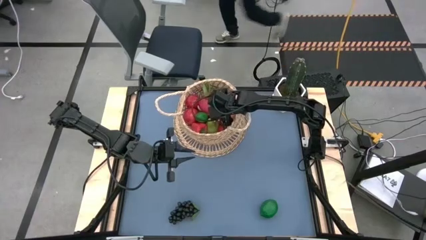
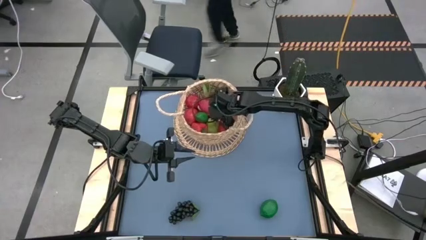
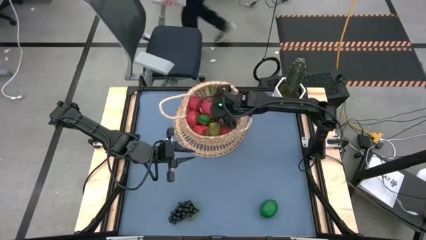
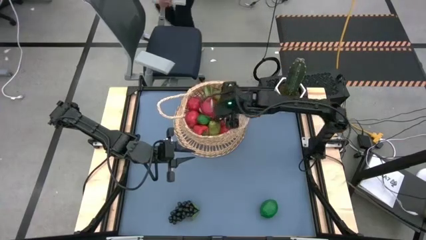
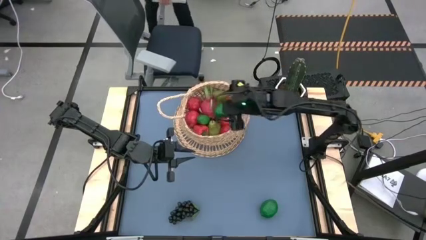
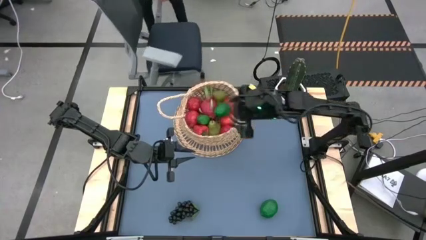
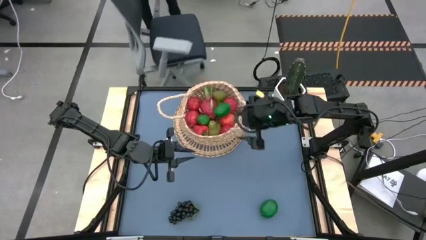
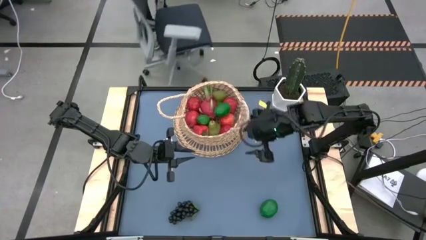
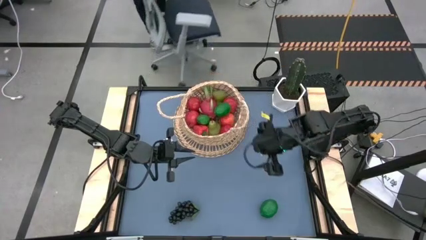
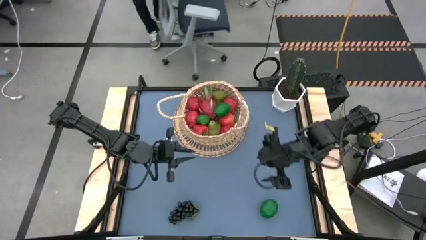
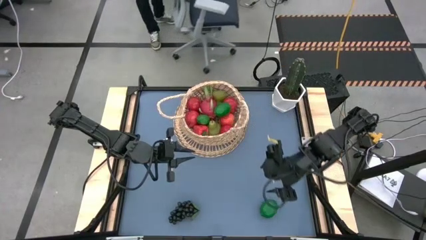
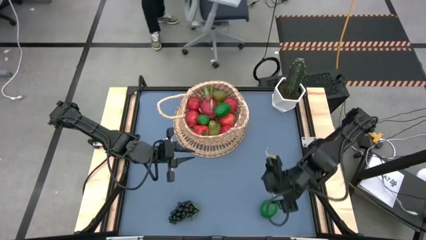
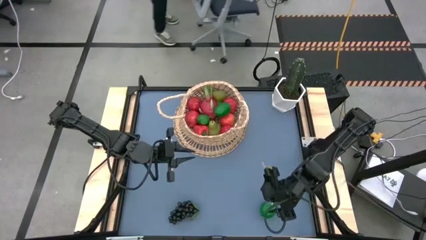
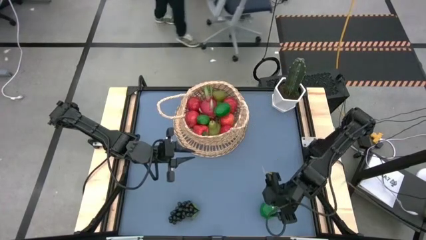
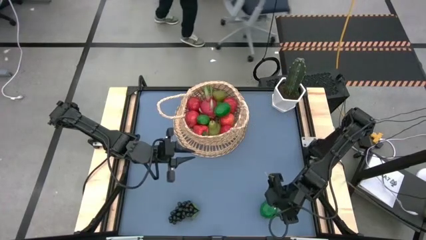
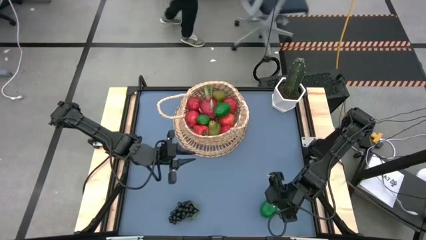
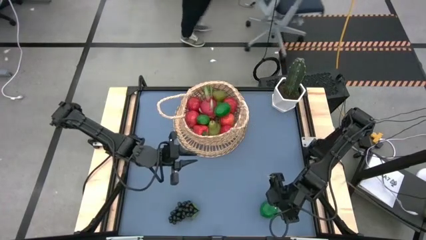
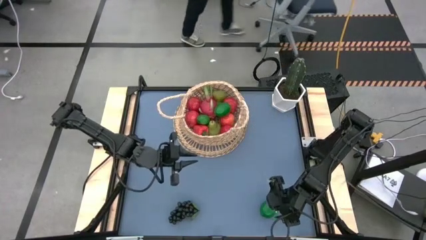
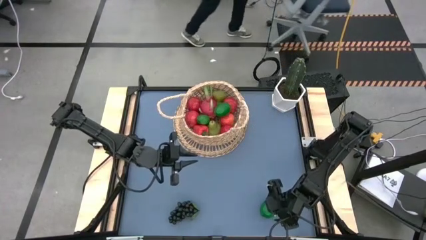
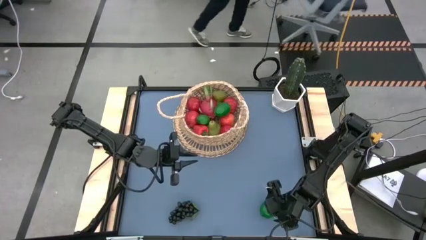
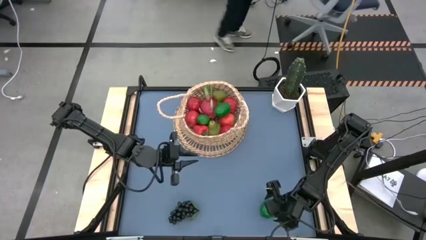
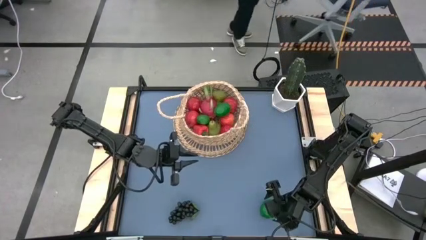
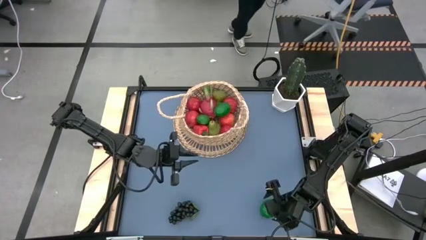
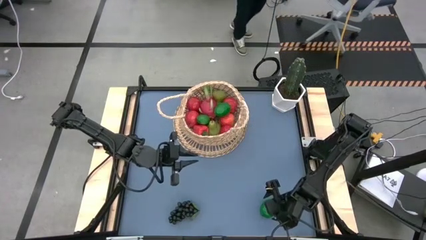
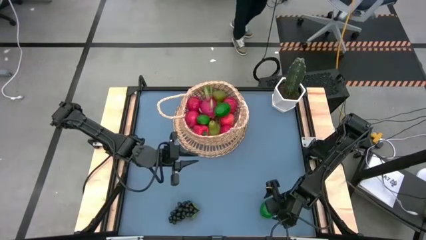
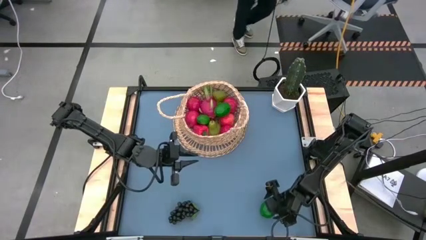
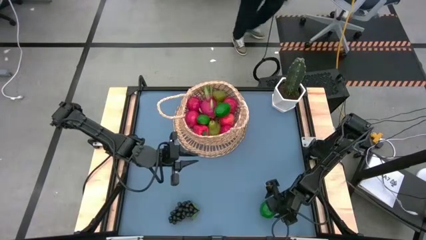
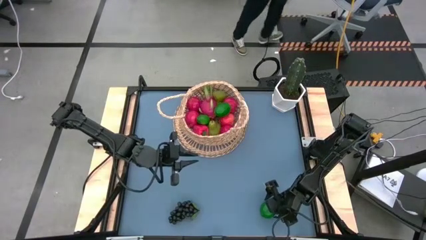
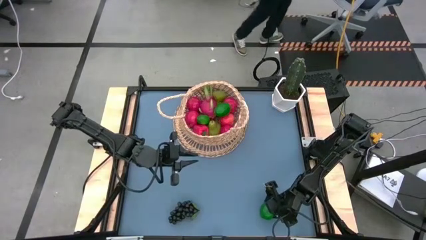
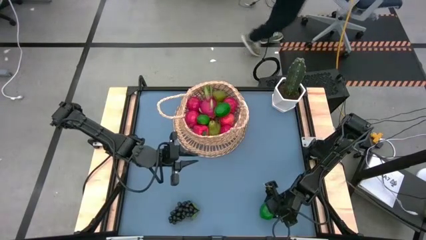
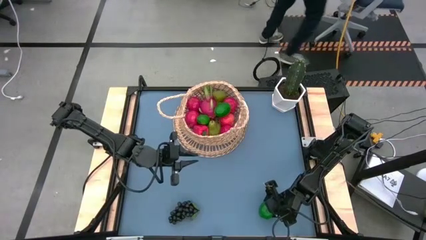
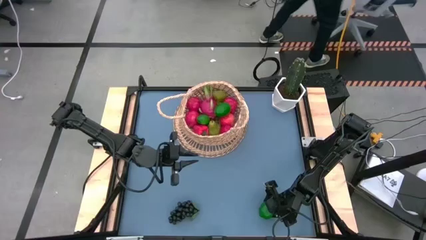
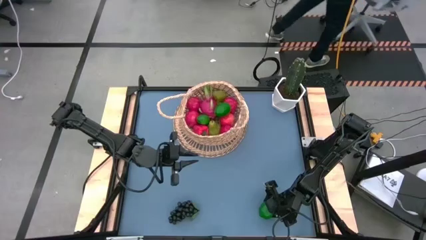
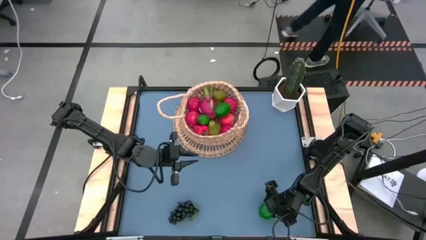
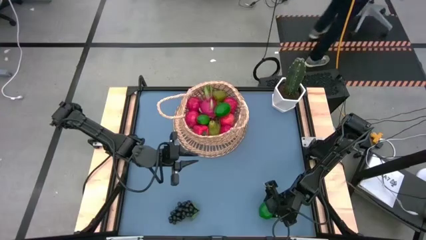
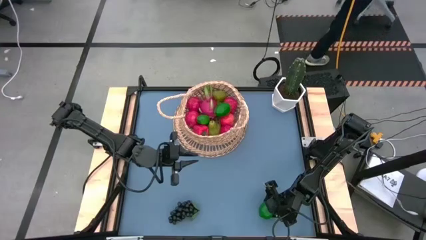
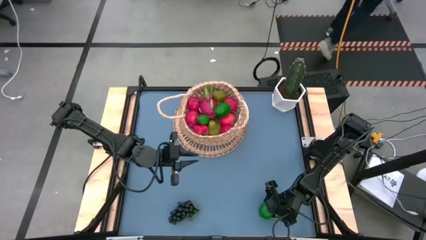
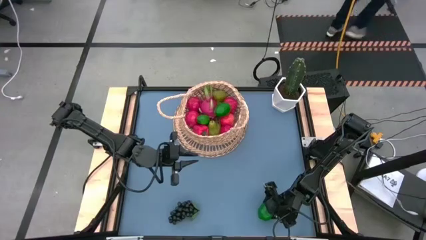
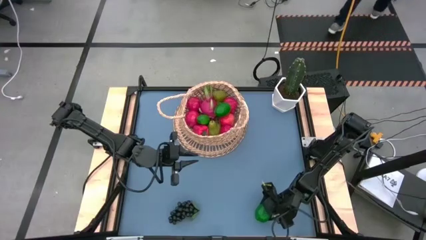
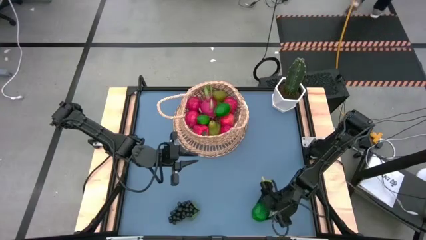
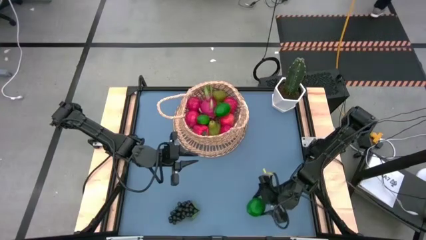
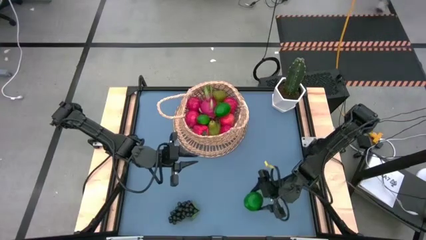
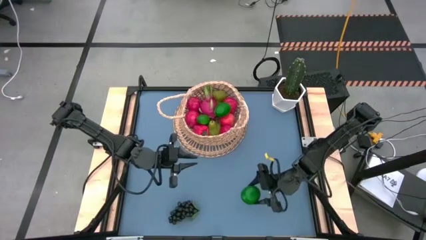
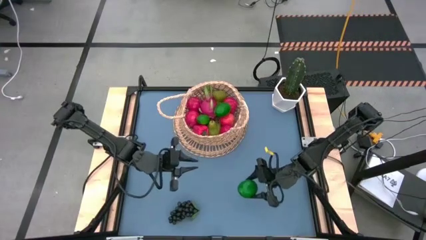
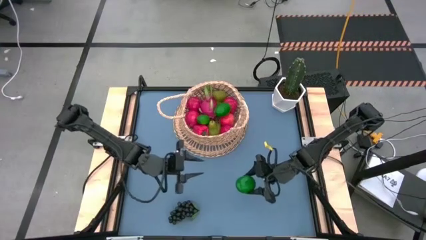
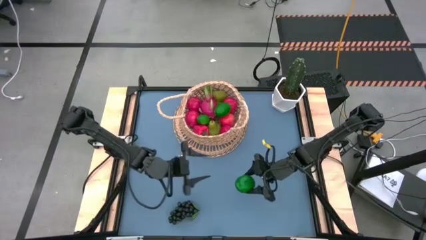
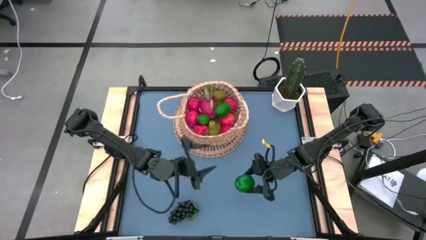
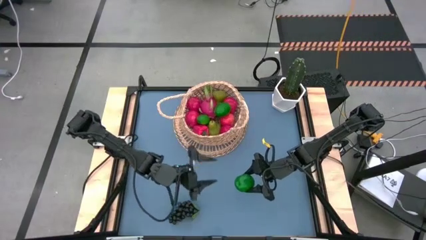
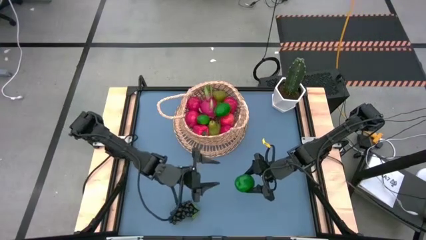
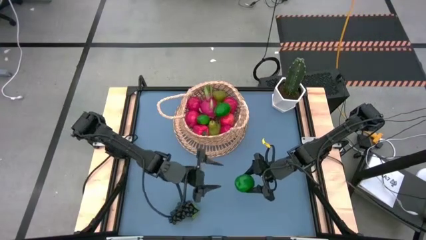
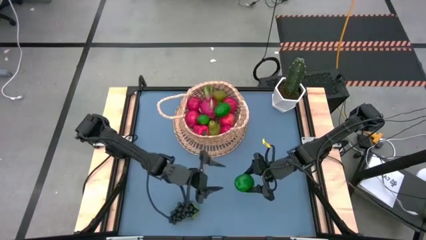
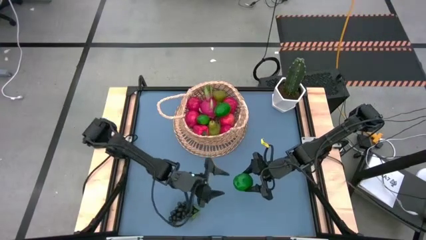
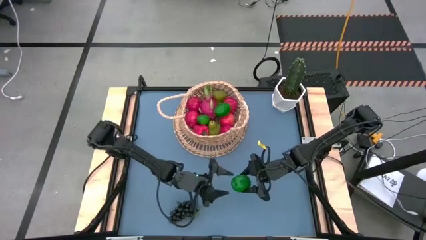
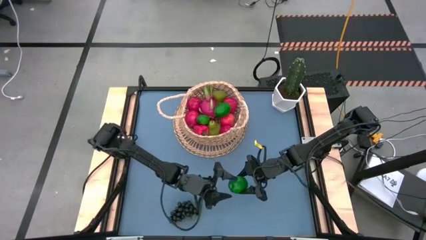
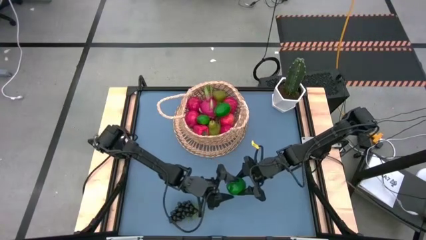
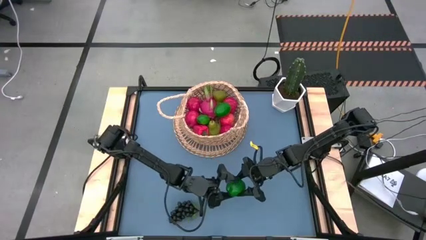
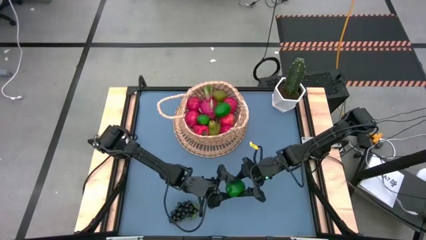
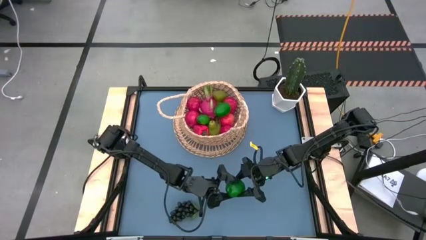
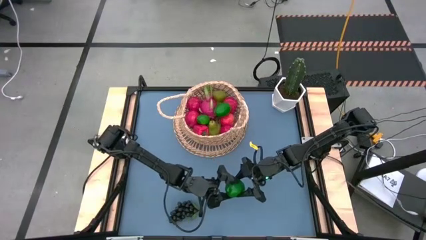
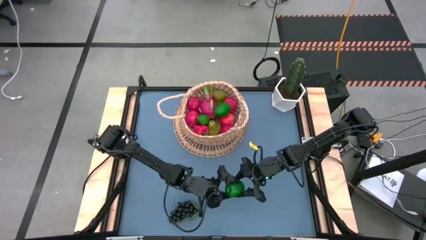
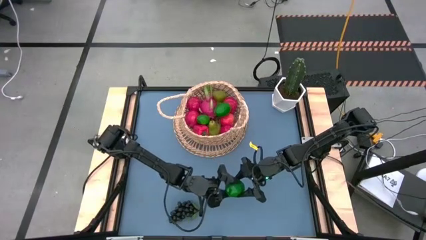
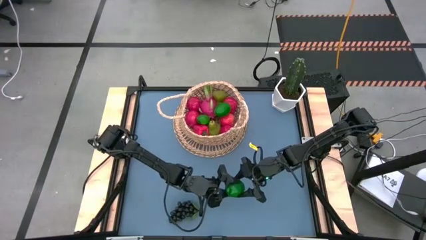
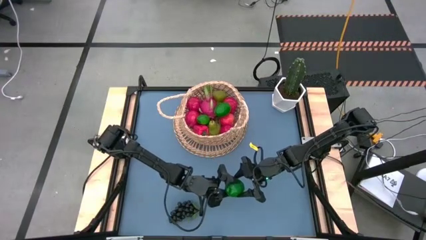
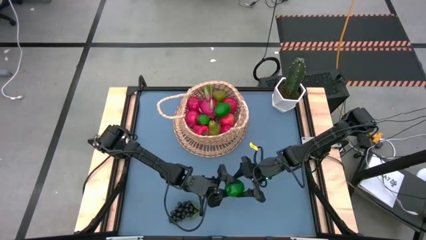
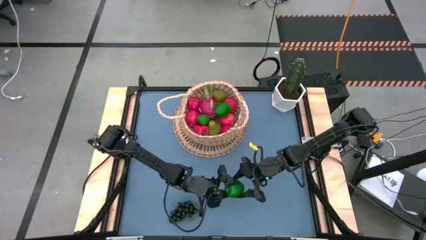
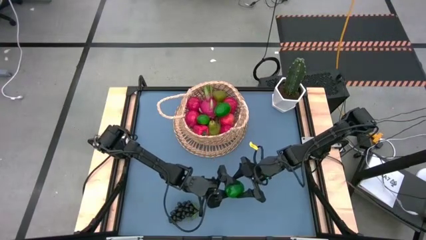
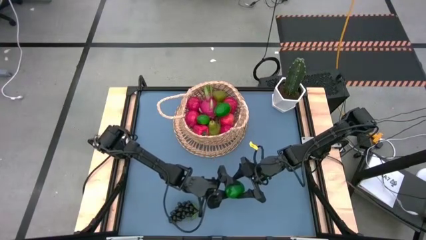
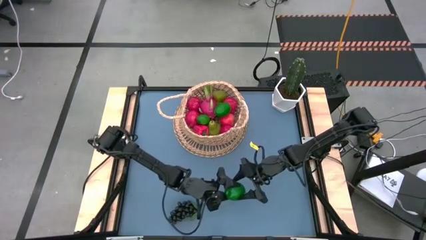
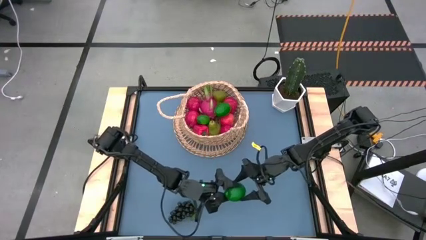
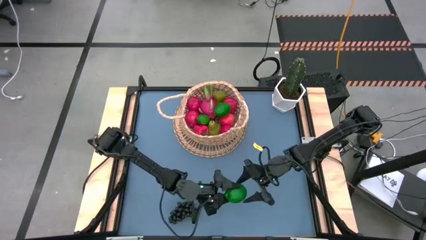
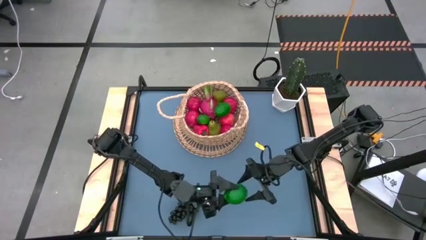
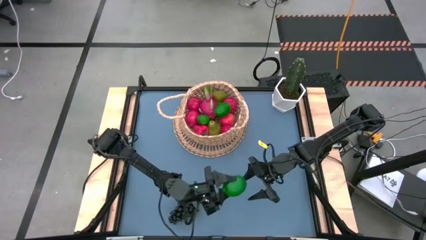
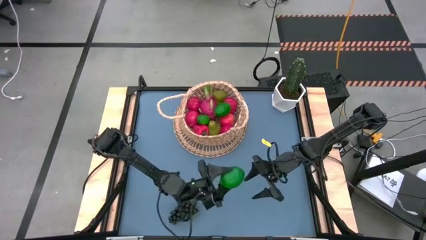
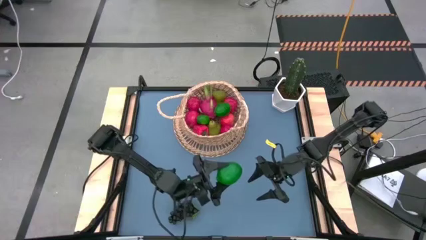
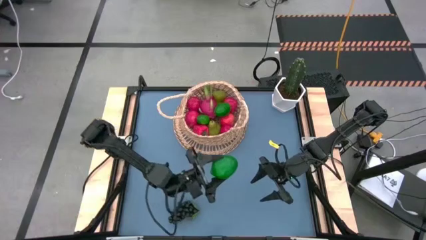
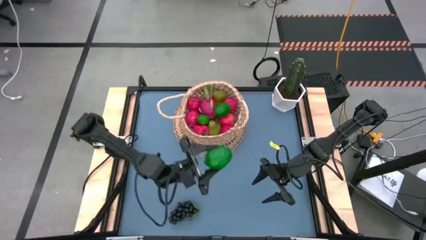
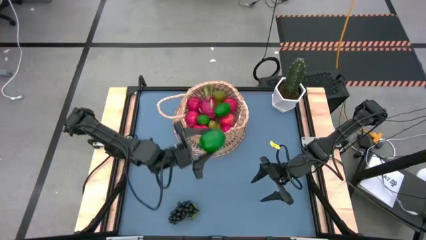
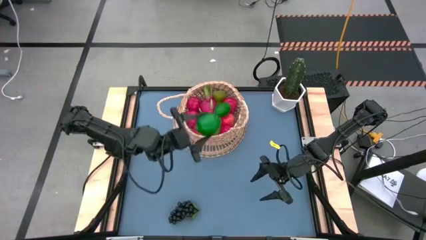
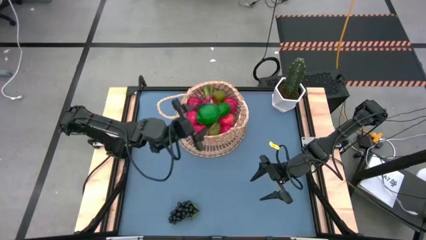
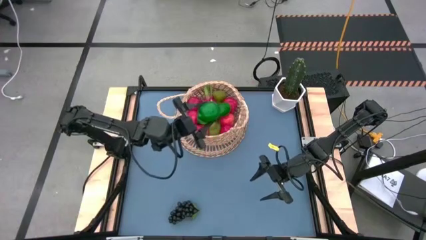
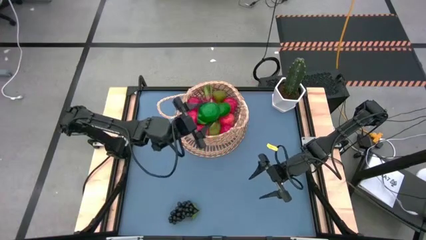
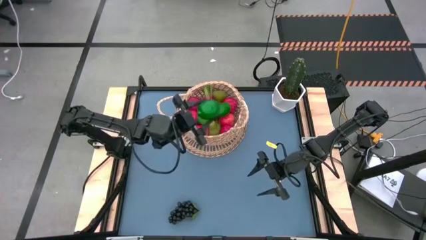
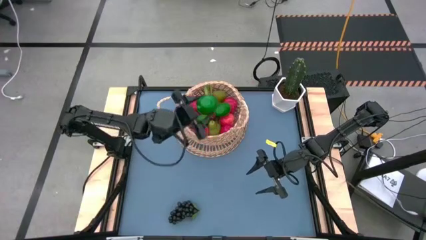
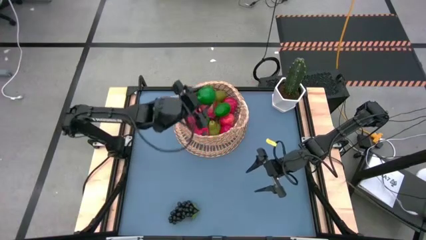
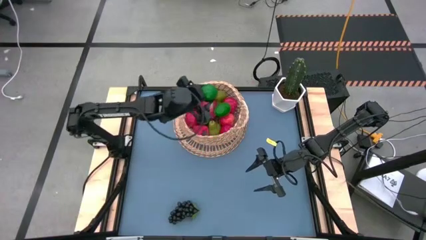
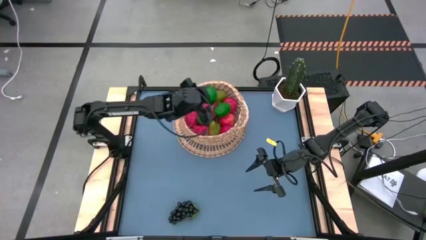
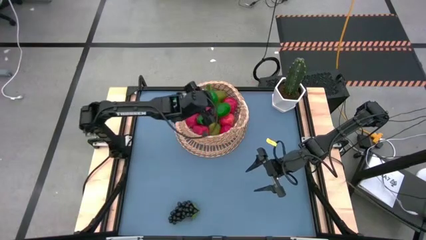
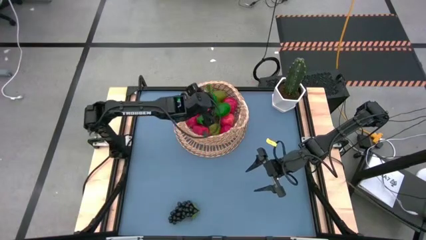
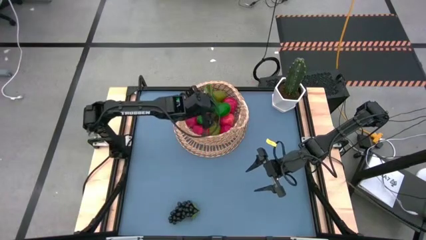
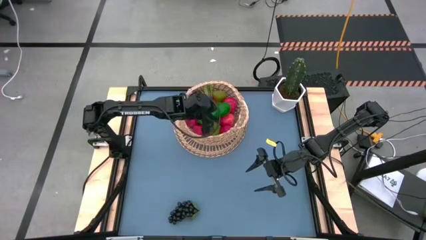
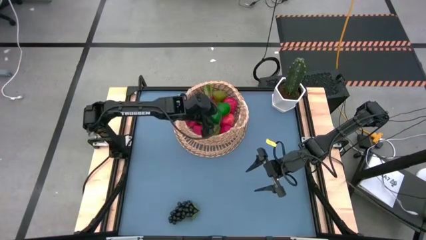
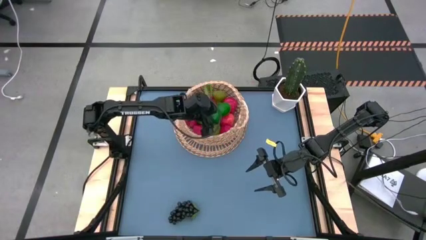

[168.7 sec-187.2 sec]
Task: Build produce basket
Put the lime into the basket
